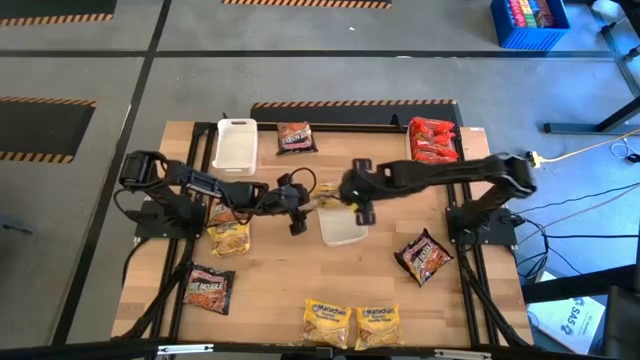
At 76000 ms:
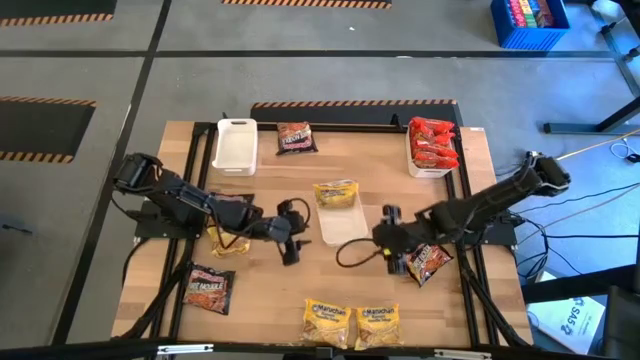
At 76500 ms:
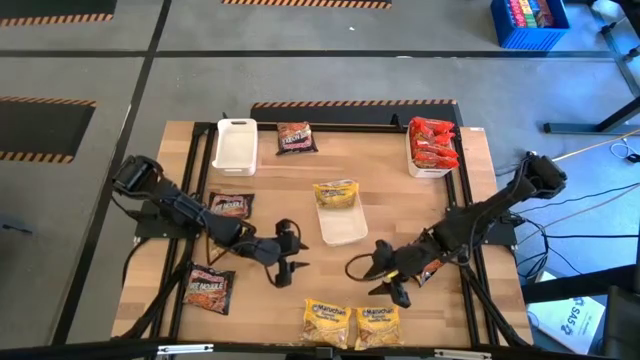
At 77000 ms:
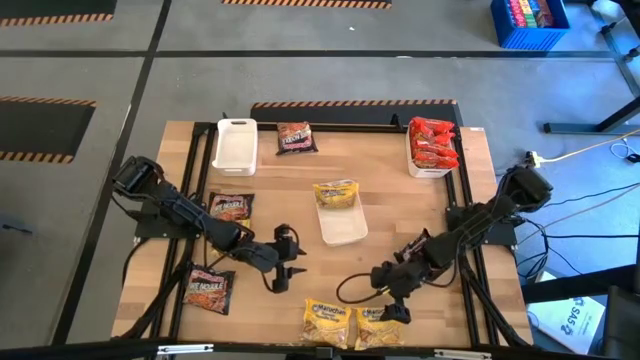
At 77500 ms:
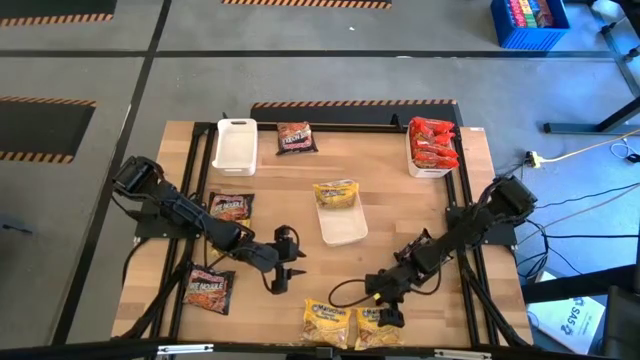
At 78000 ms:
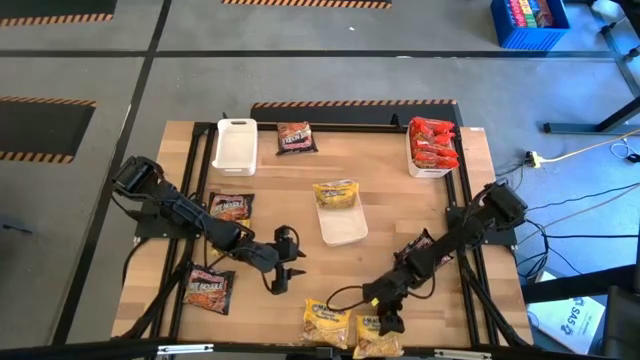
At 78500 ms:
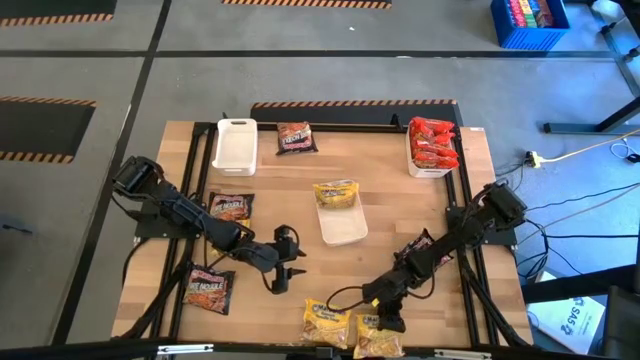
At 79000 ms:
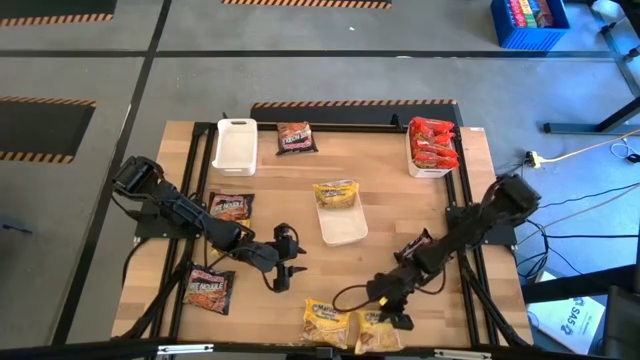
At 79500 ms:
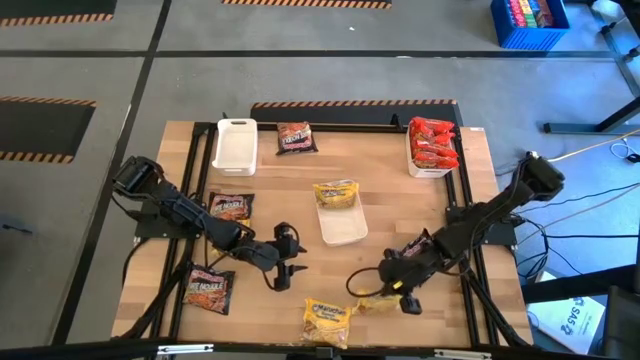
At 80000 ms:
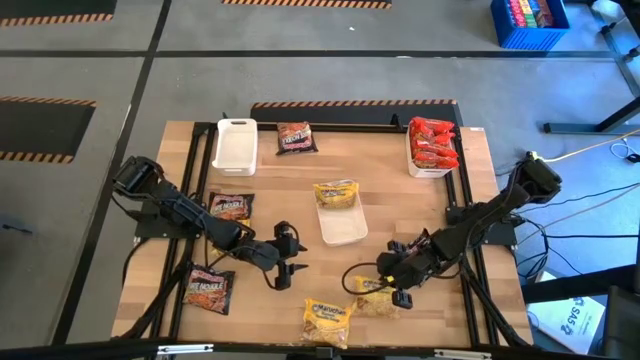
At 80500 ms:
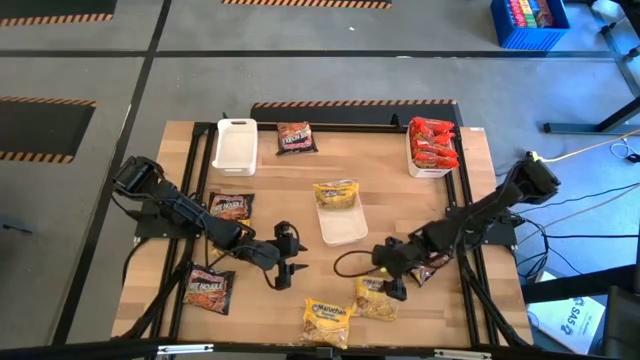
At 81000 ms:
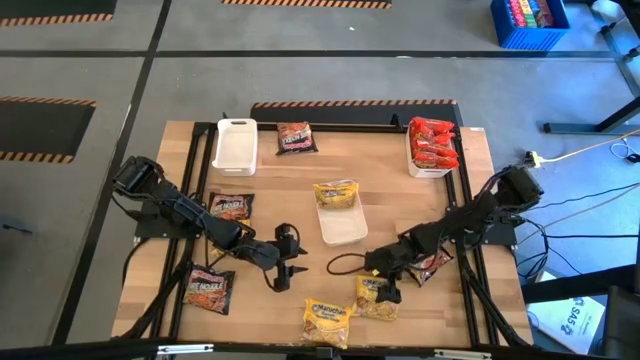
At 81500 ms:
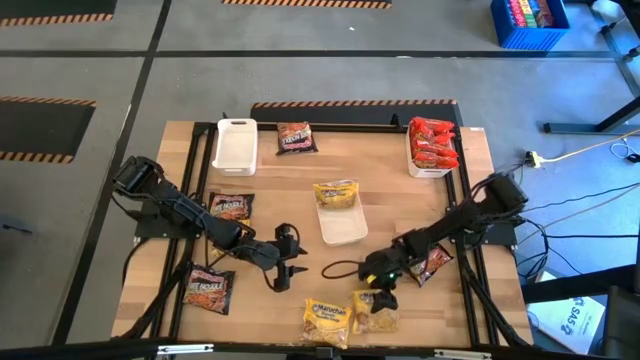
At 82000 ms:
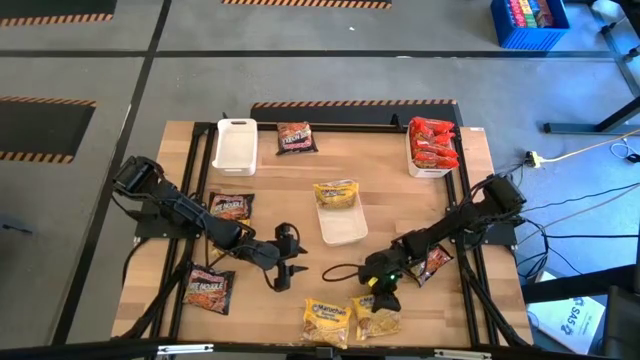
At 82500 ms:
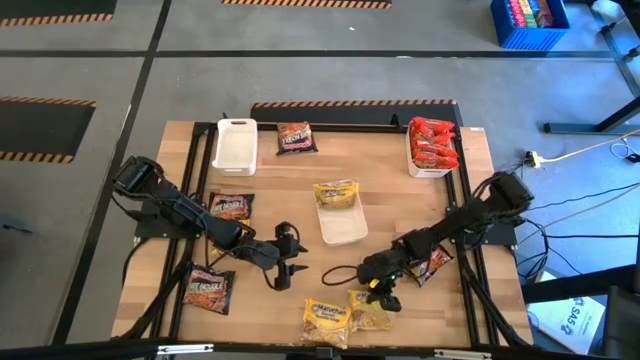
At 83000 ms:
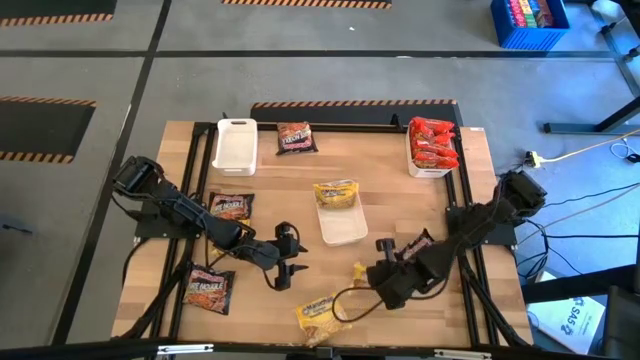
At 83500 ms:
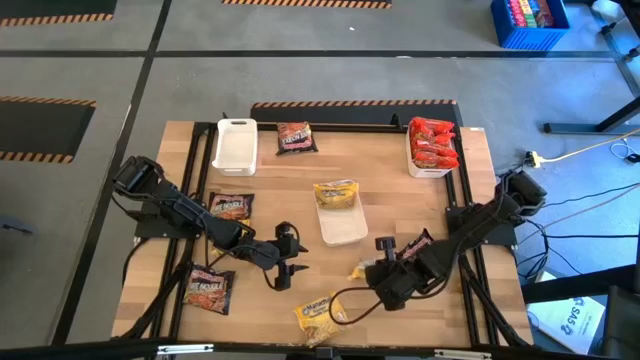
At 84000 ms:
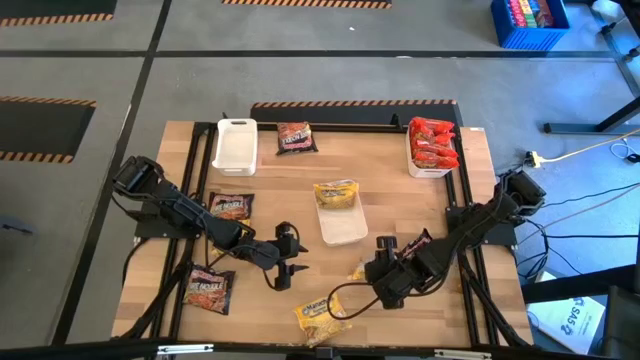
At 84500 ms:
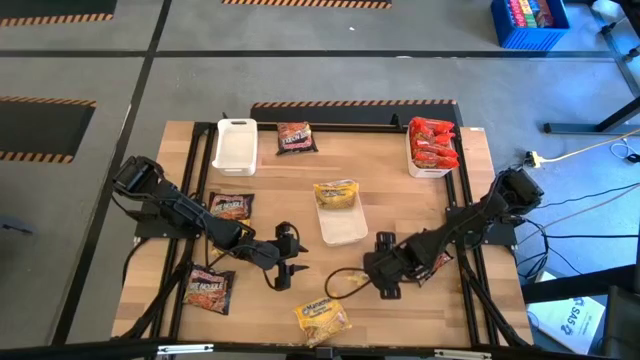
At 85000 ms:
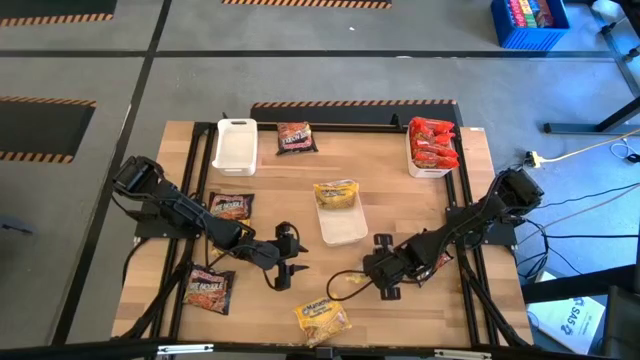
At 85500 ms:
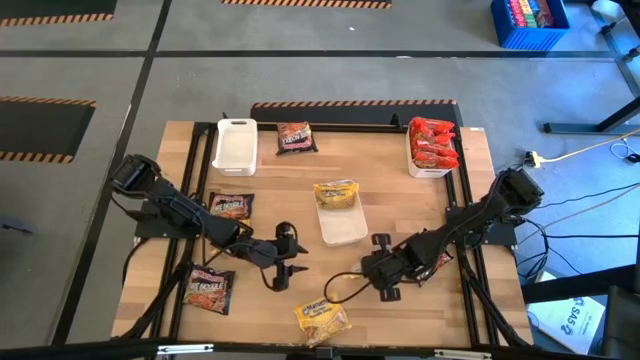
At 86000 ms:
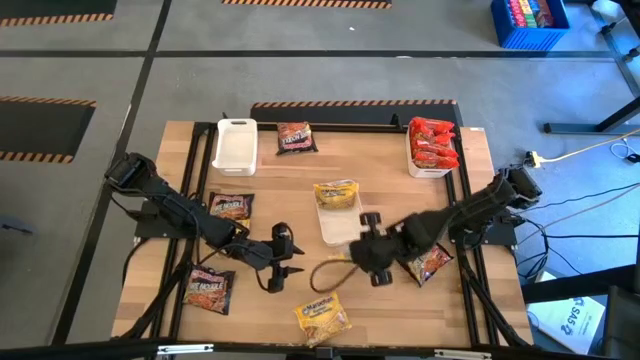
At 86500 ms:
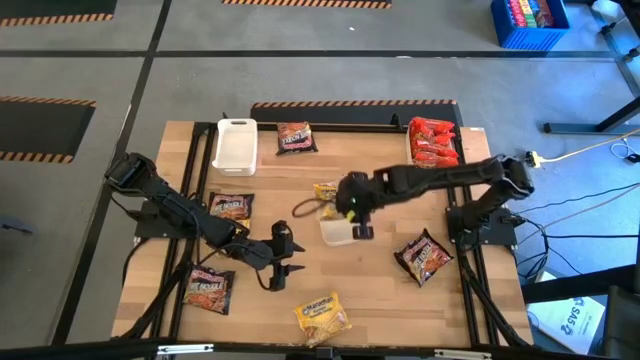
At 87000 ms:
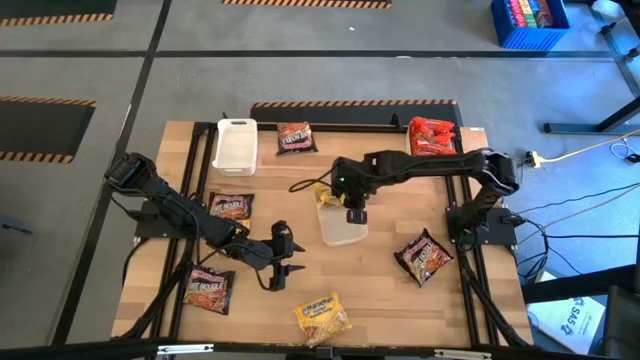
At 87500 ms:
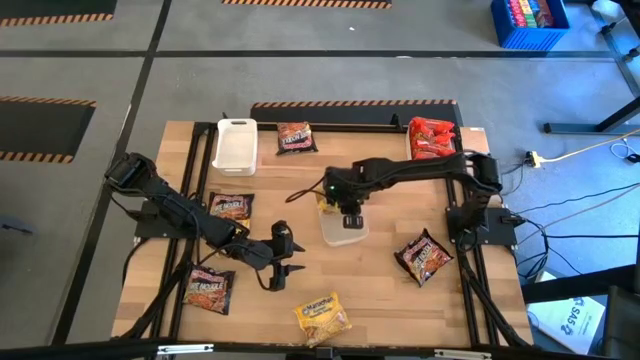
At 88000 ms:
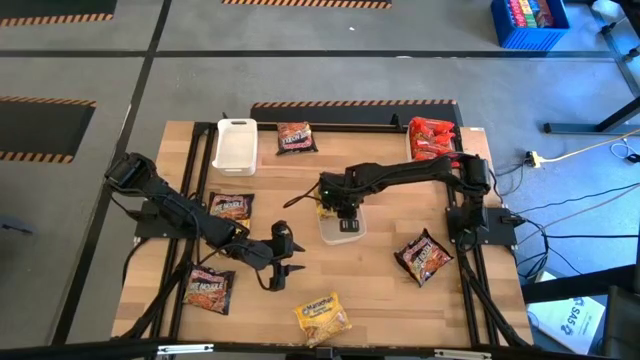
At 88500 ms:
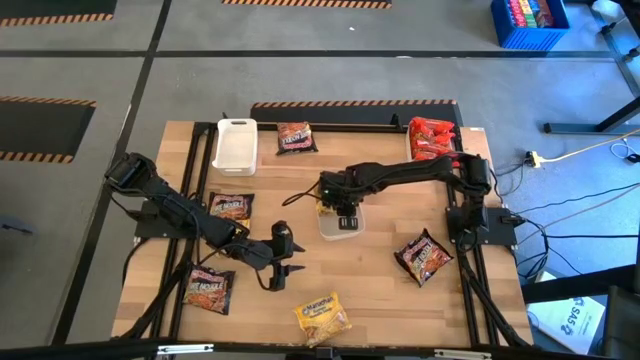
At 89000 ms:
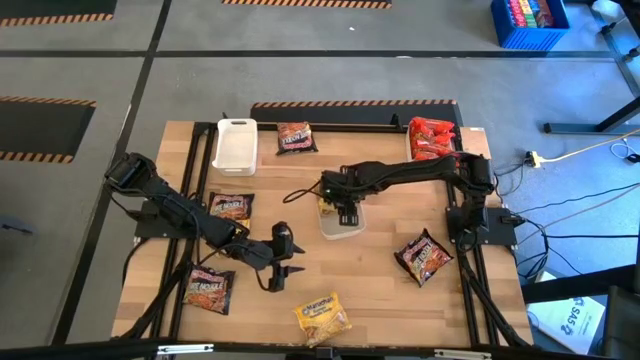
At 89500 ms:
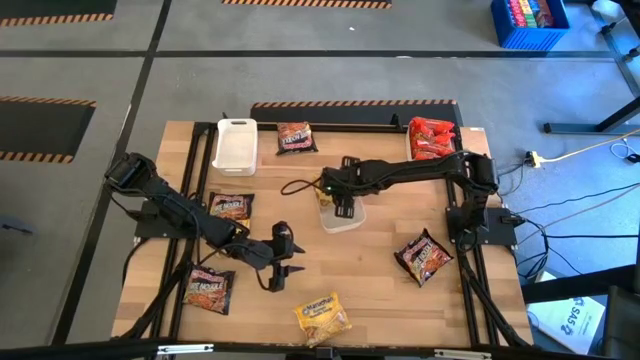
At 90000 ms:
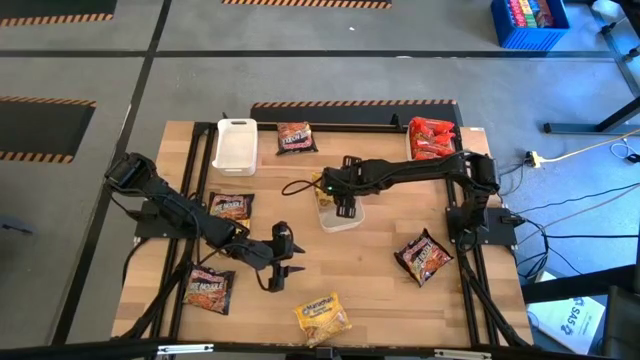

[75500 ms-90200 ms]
Task: Sort Maruchan noodles
Put the yellow noodle pack into the white middle bin

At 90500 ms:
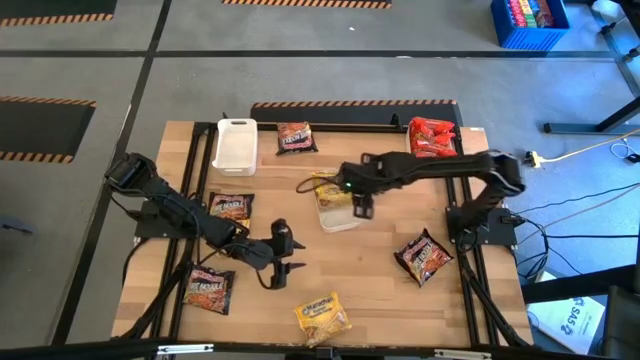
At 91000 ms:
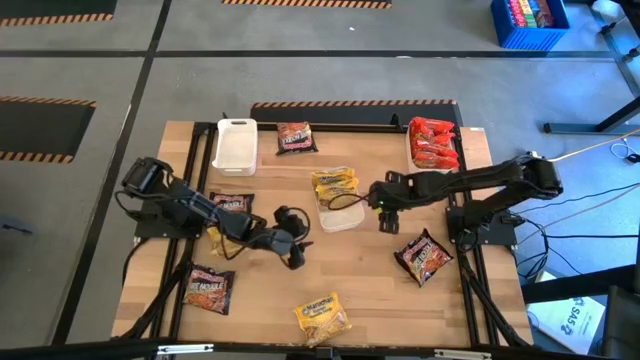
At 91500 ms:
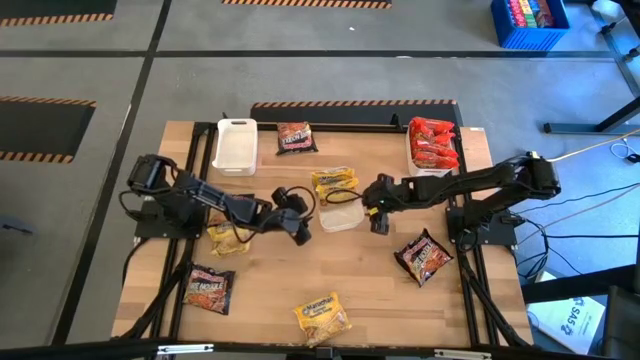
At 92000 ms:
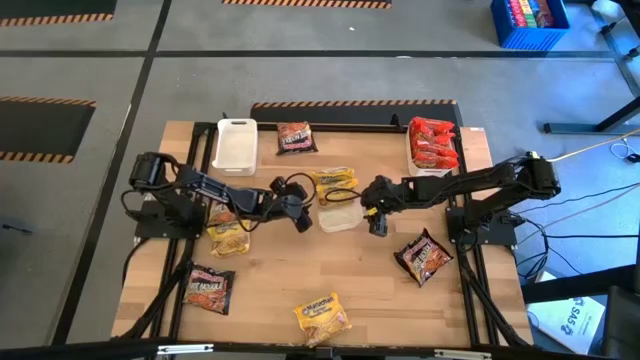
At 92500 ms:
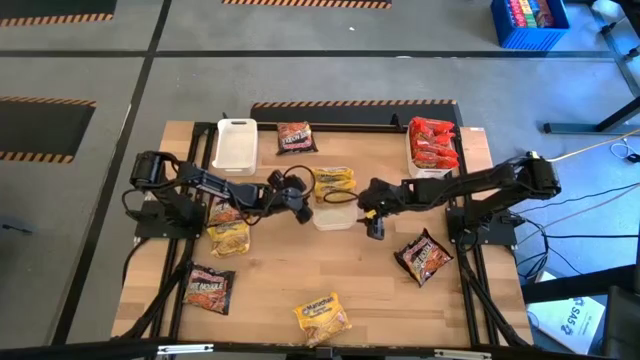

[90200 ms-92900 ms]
Adjust the white middle bin

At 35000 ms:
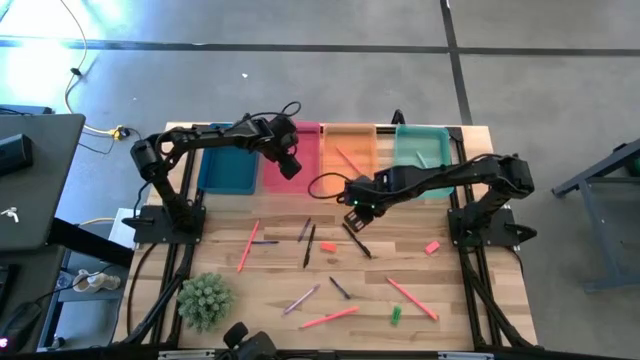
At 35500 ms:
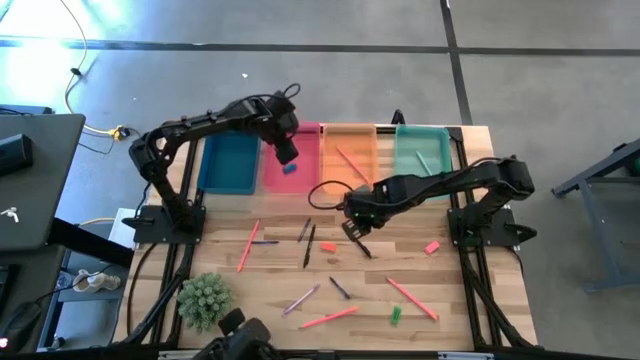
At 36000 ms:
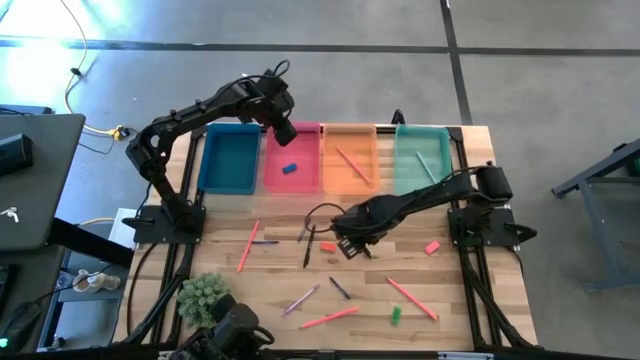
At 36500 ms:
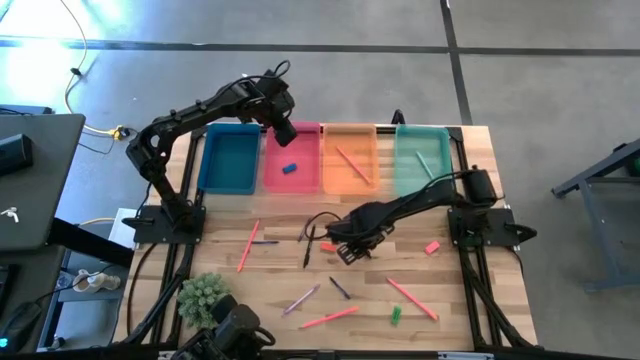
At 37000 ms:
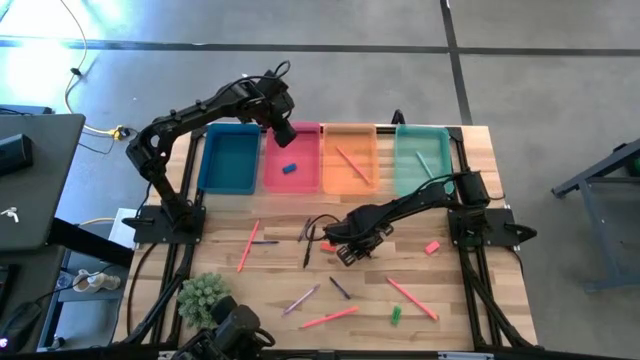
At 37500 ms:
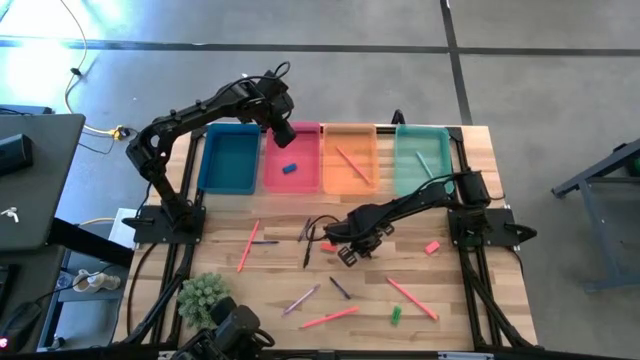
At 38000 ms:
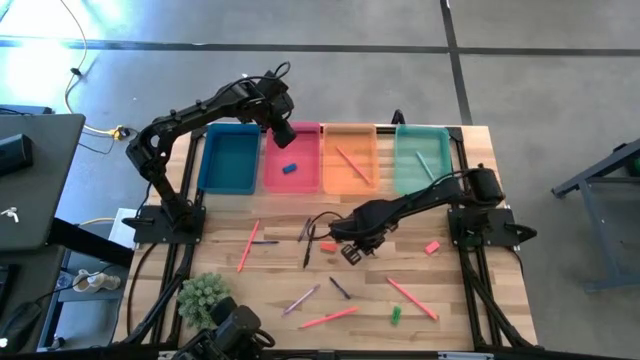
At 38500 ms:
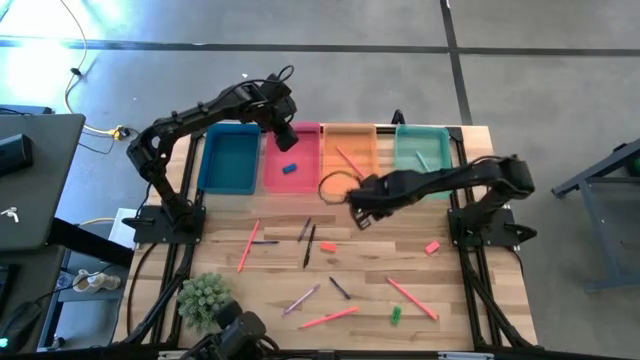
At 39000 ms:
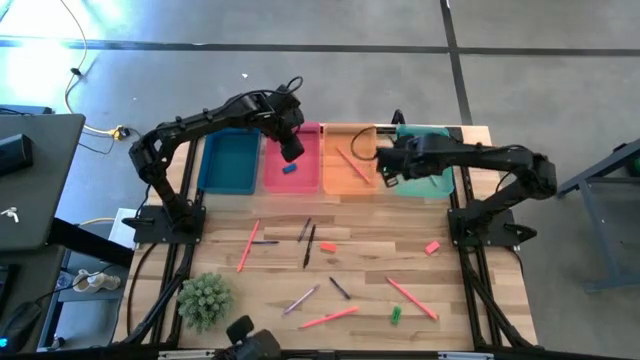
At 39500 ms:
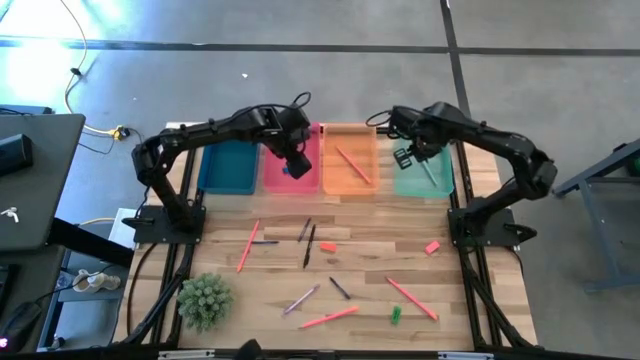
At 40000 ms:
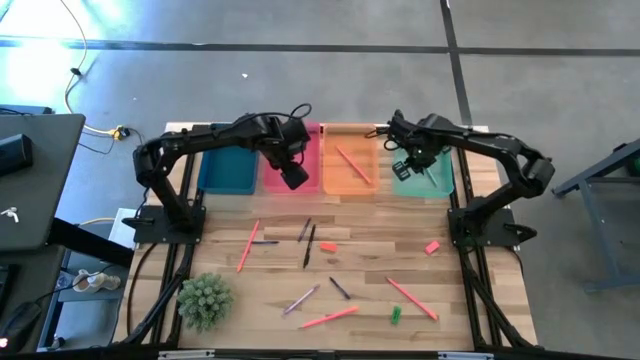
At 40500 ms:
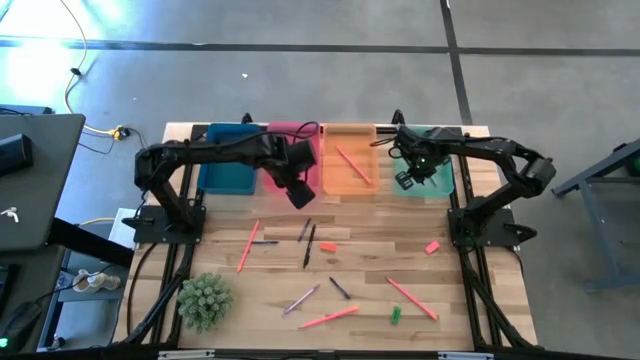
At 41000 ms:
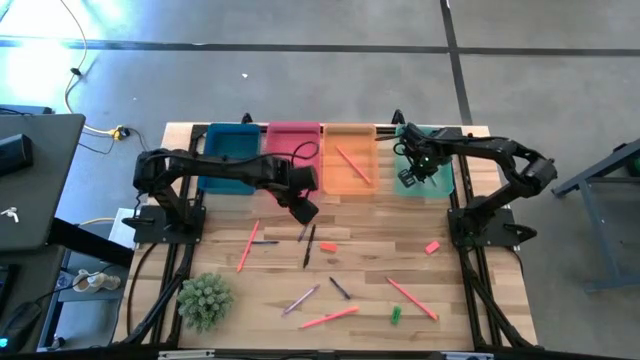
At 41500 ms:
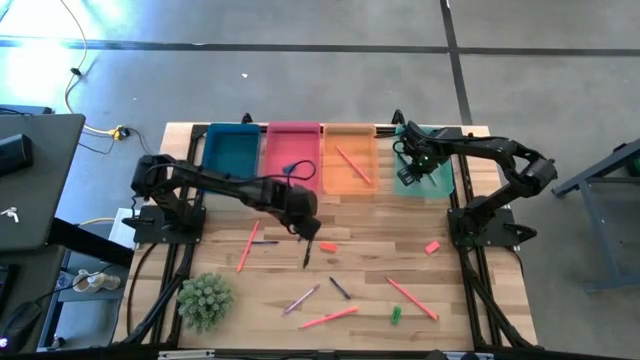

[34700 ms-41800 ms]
Task: Sort crayons/erasers/pens/pencils in bins
Put the black pen into the green bin
